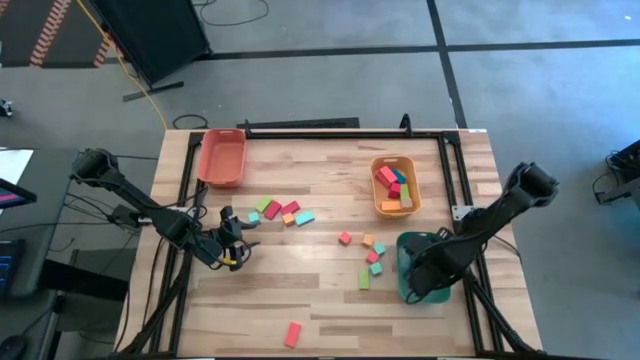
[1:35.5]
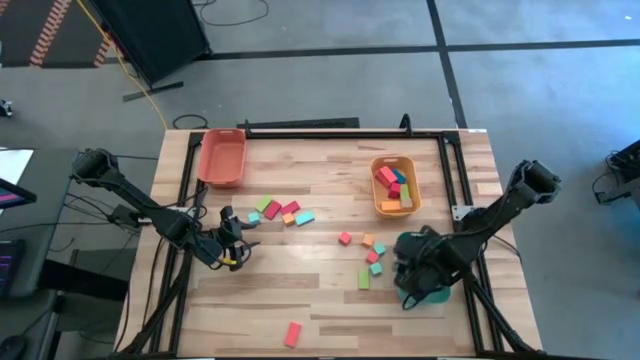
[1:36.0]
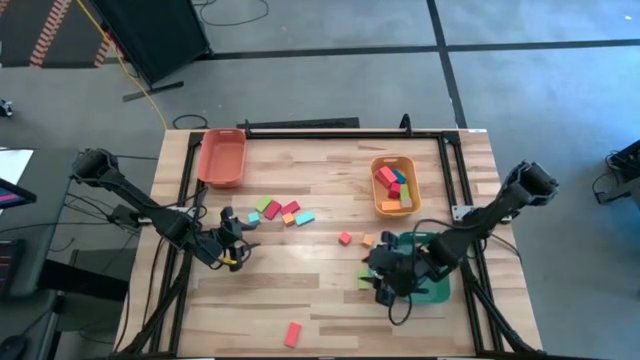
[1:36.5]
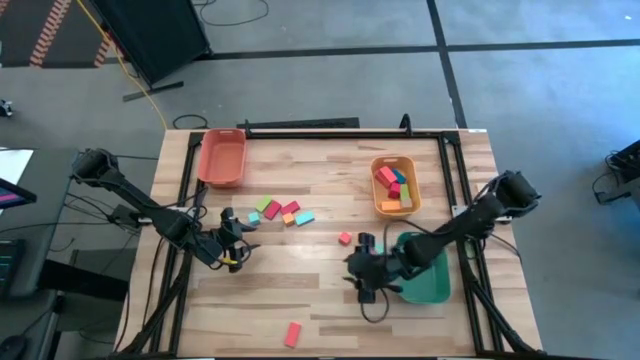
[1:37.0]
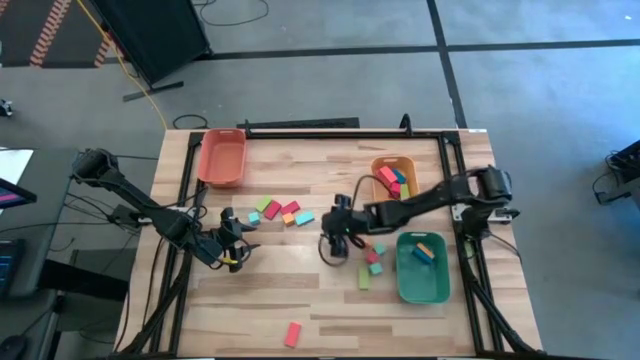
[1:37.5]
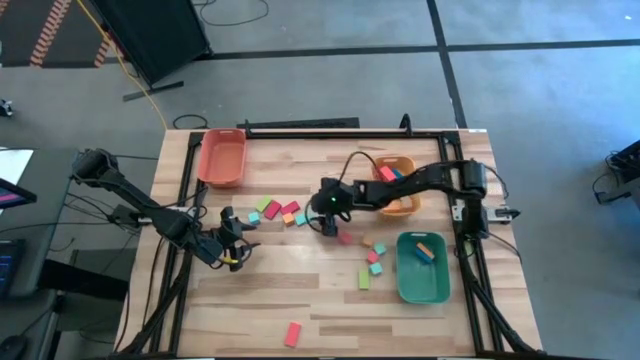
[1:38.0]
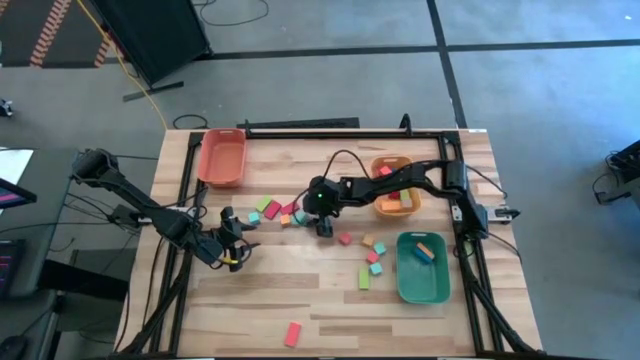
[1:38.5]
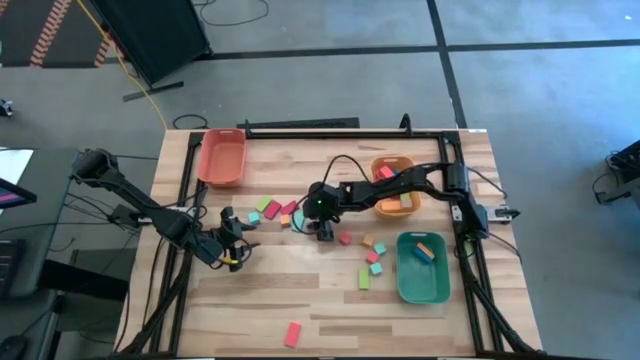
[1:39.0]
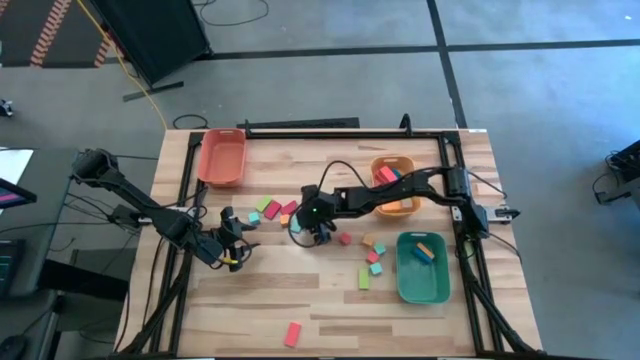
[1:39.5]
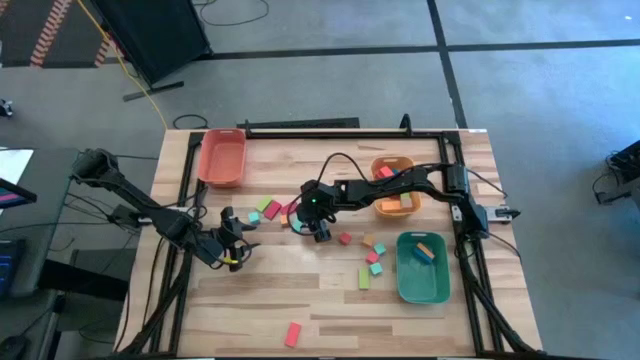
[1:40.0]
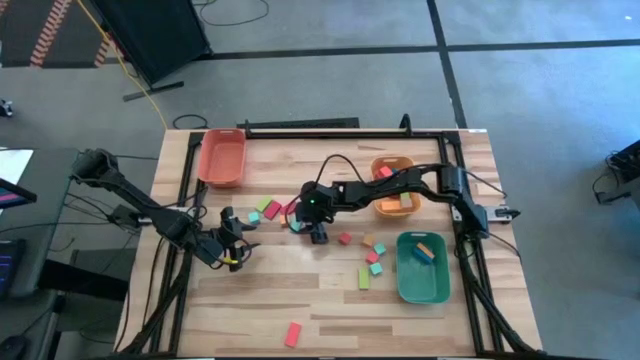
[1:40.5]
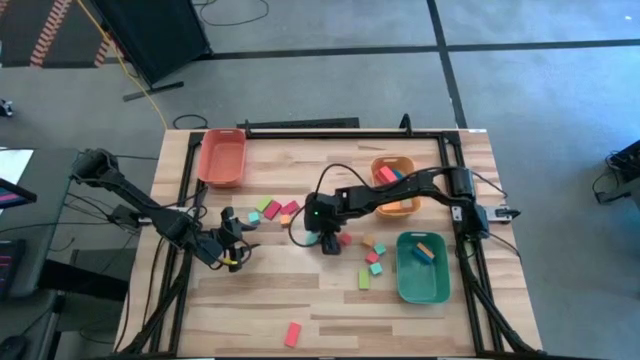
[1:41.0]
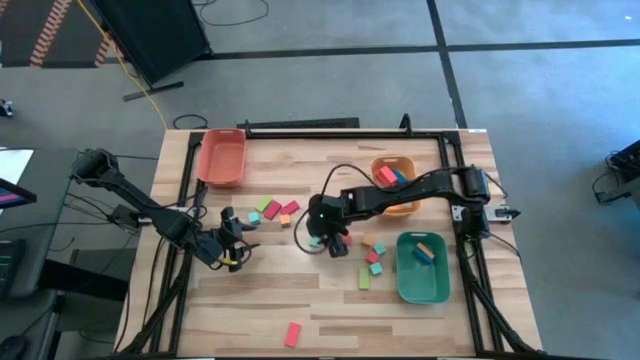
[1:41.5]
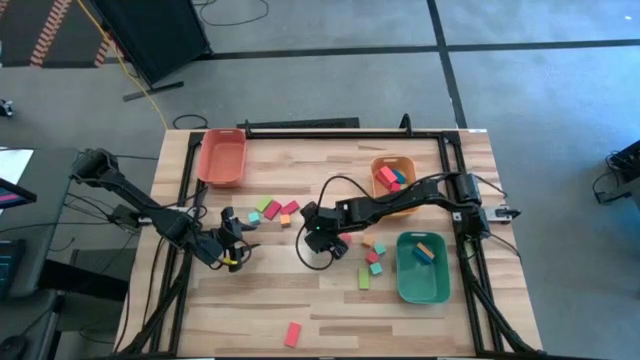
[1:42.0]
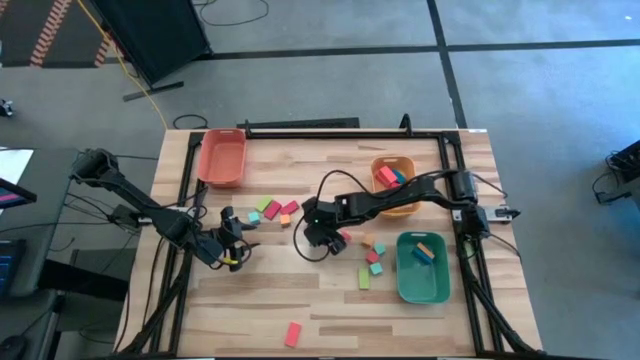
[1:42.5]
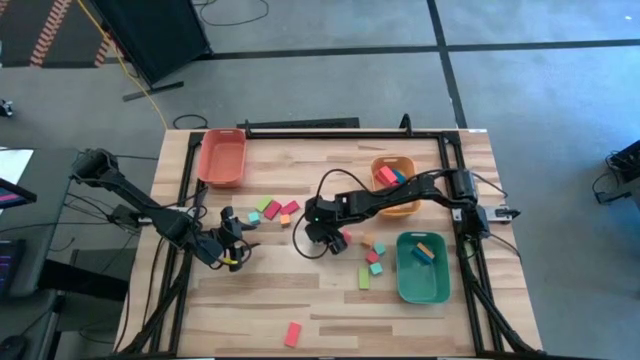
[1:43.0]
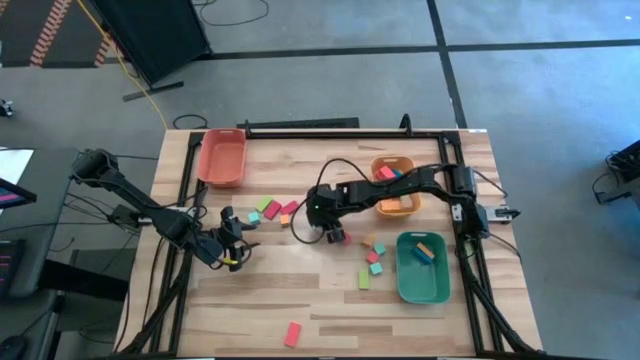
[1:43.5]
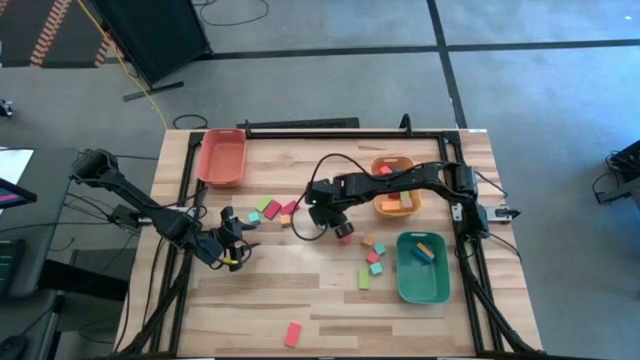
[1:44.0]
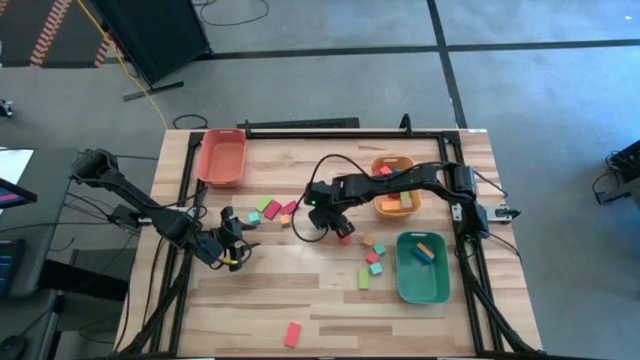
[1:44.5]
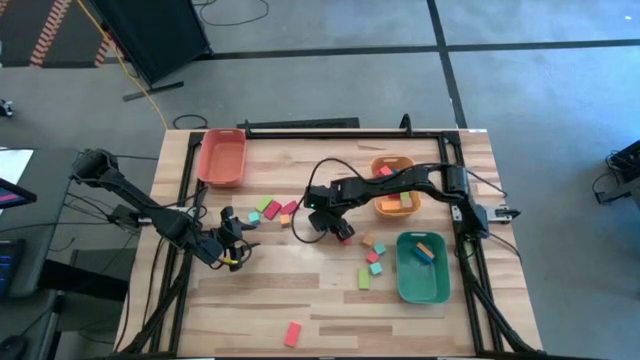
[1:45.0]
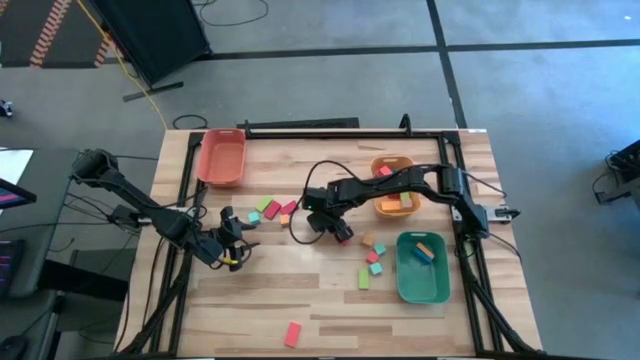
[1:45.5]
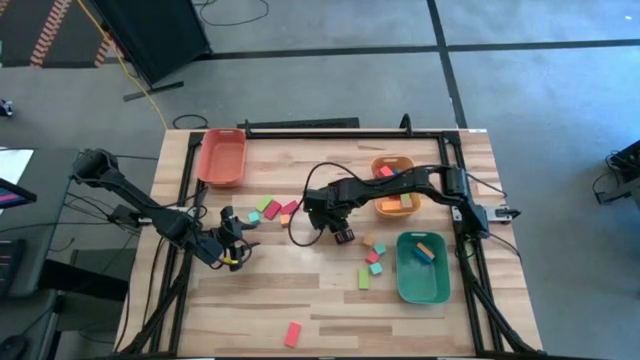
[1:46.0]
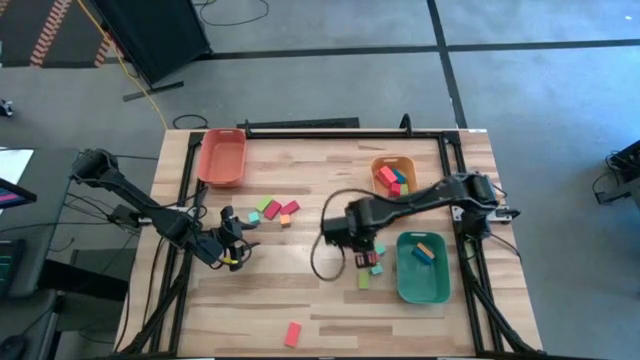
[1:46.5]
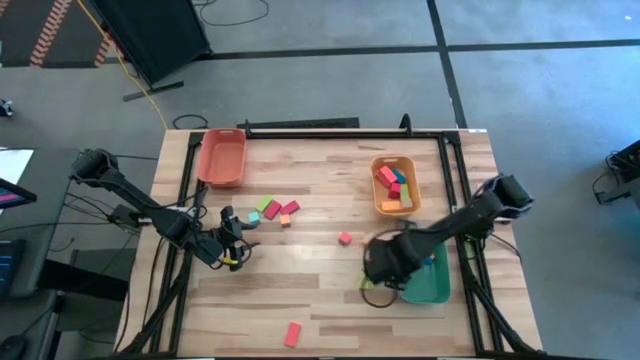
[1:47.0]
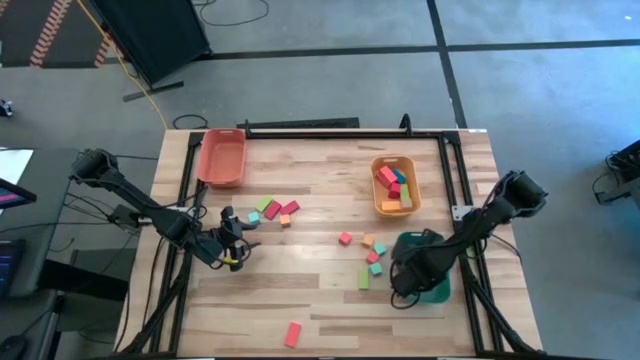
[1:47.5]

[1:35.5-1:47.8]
Task: Sort blocks by size
Put the small rectangular blue block into the green bin

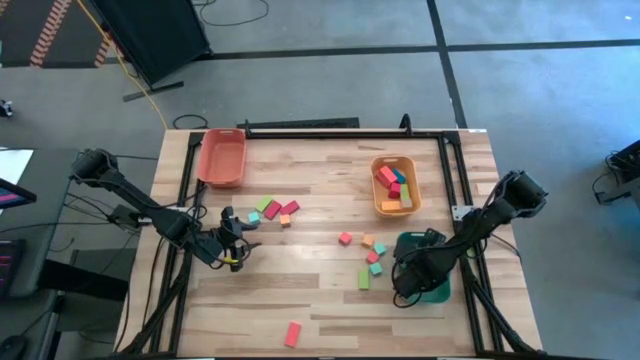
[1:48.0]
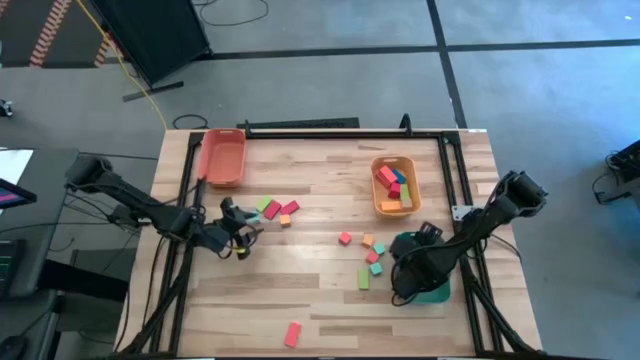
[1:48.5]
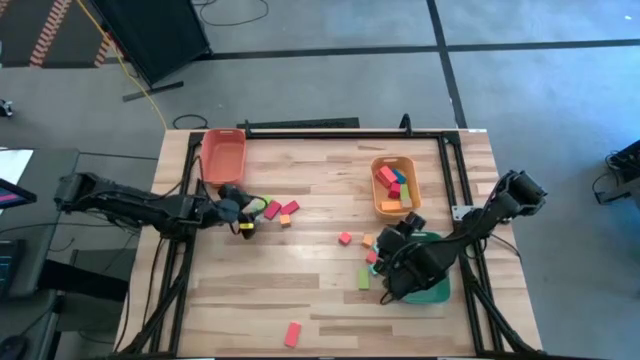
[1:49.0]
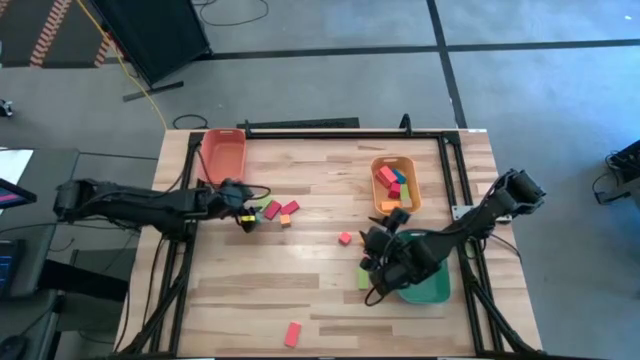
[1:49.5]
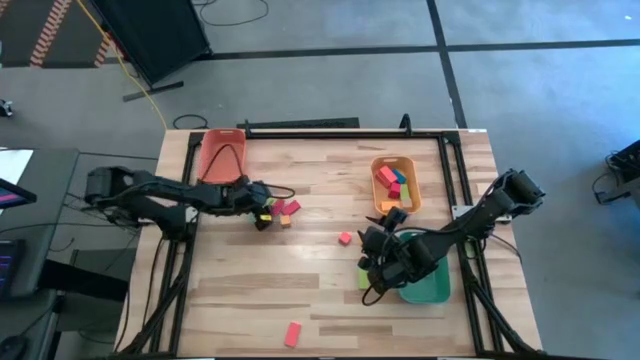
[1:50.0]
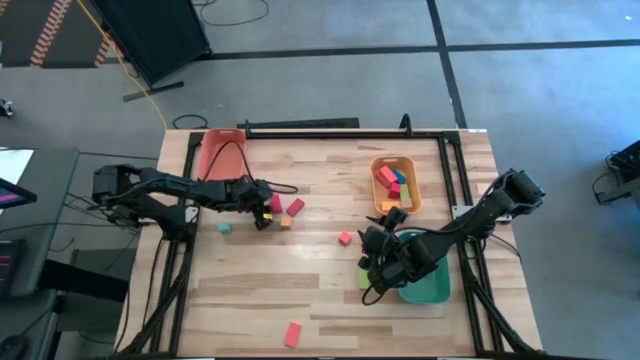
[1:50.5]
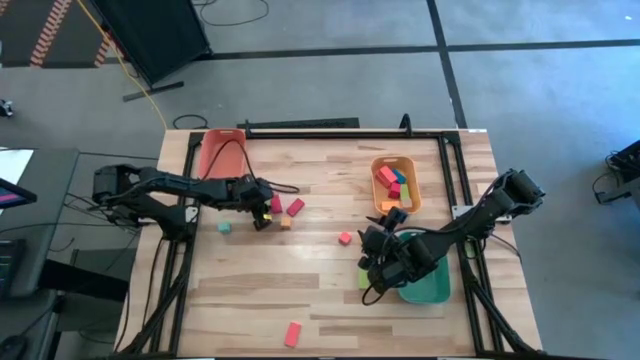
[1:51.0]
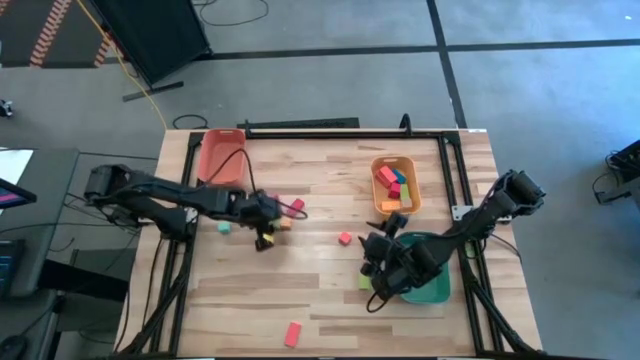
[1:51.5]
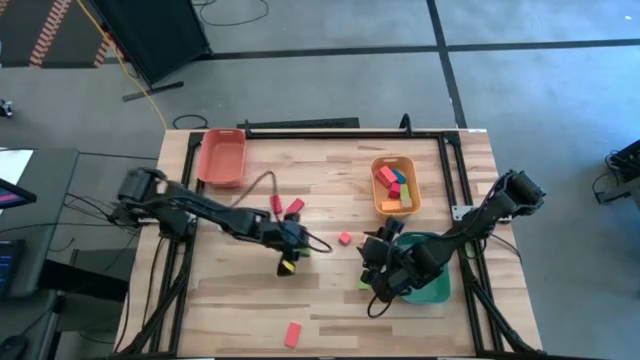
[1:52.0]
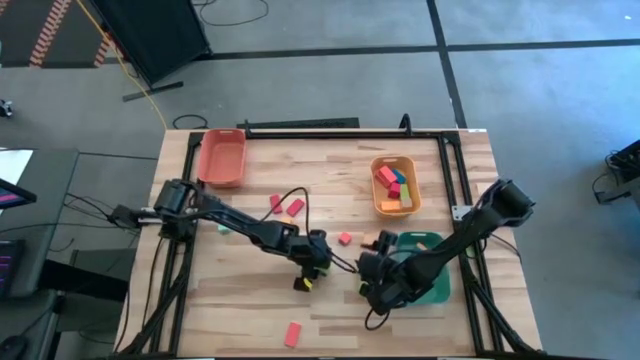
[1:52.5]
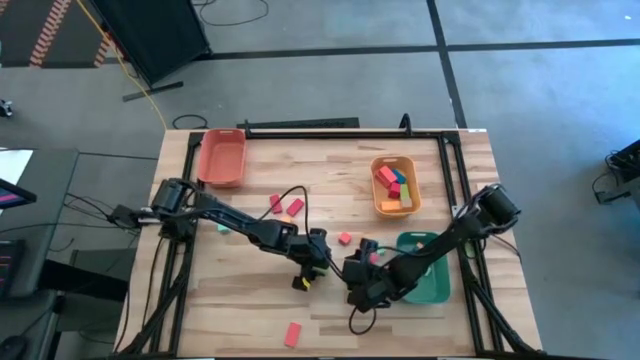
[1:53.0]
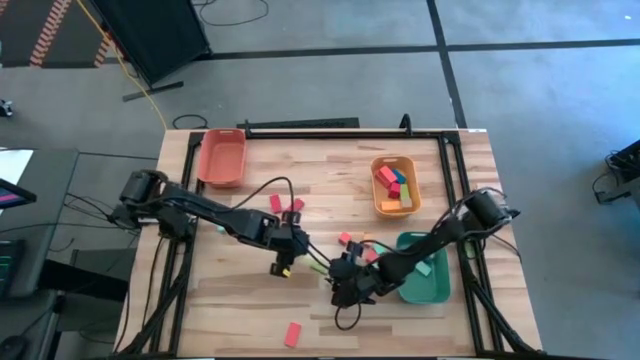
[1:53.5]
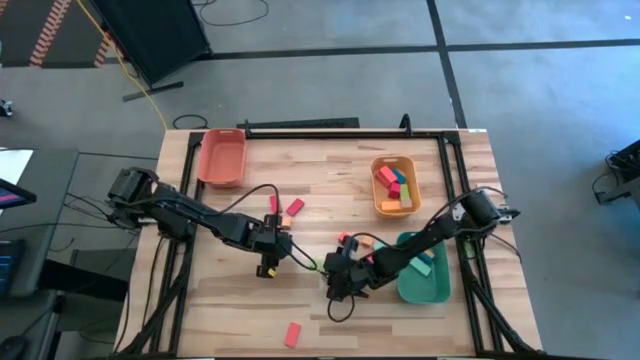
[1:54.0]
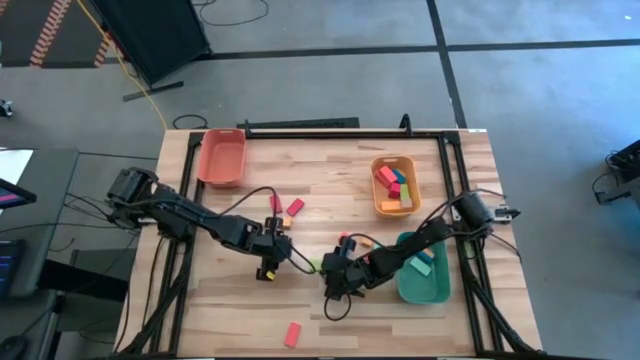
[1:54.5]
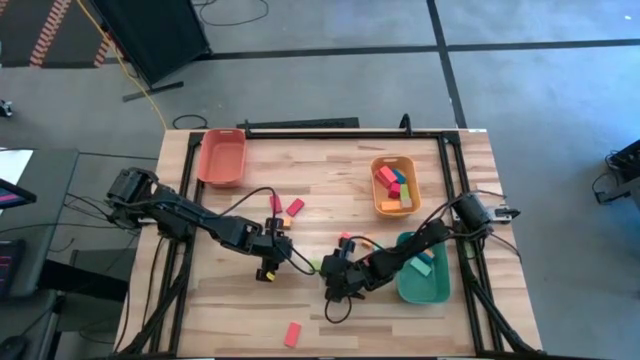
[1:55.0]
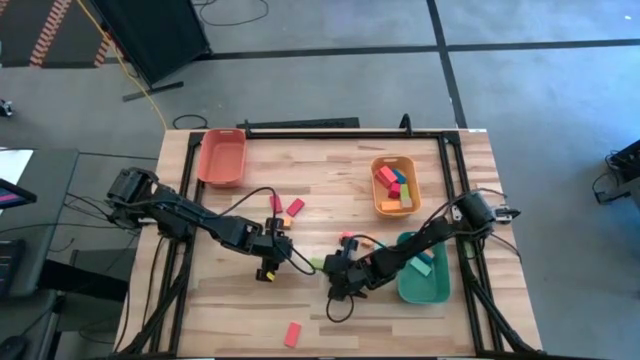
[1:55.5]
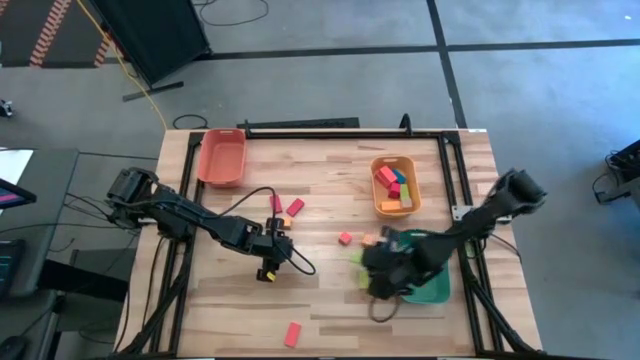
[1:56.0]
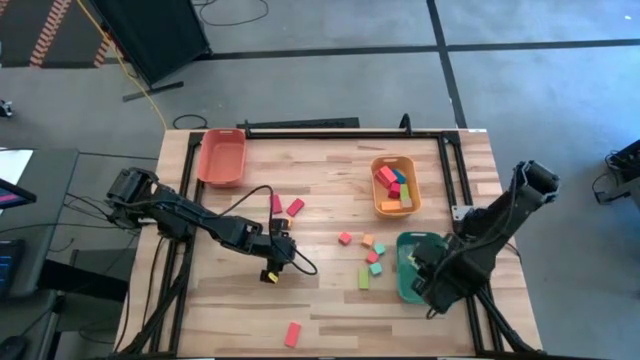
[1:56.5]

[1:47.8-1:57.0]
Put the small rectangular green block into the green bin
